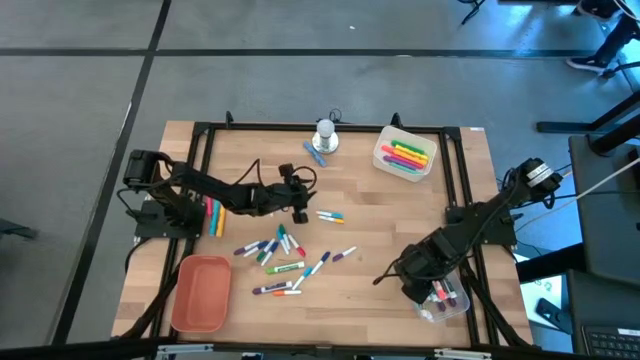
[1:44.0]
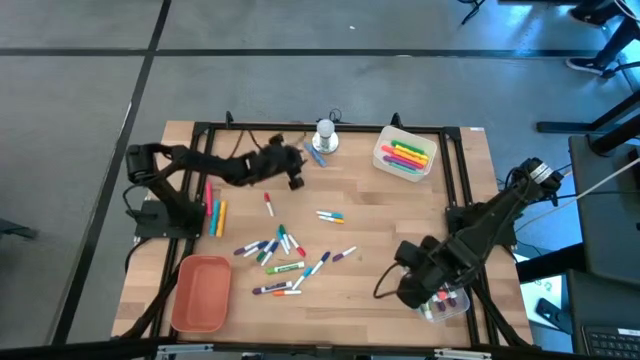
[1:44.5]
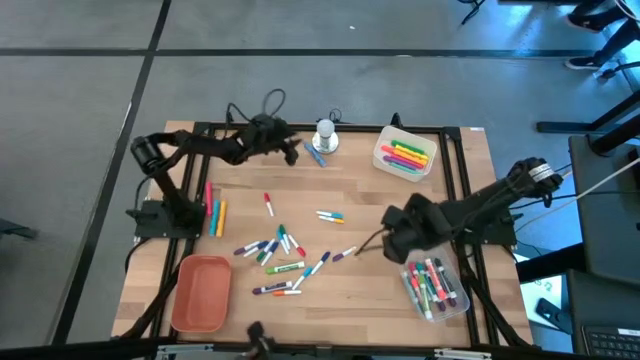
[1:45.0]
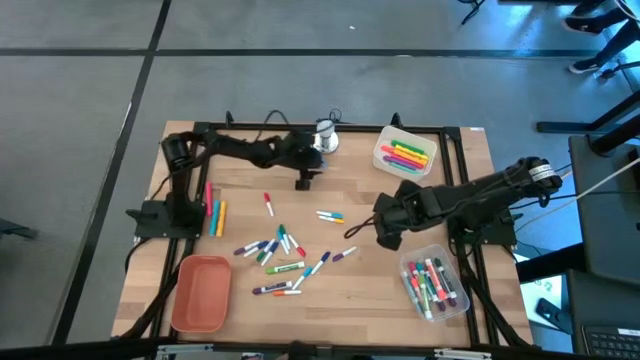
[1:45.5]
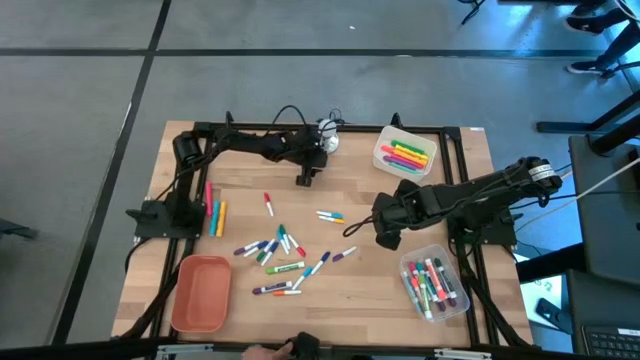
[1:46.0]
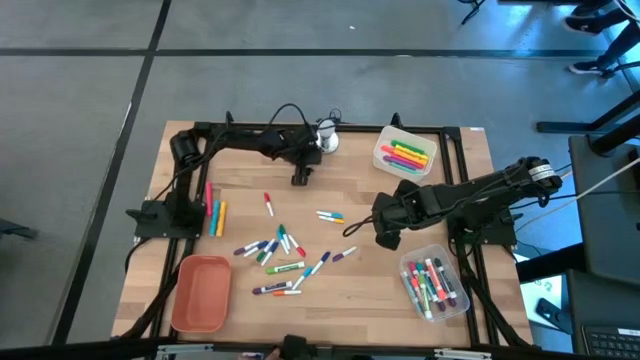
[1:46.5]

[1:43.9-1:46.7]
Task: Pick & Place Markers
Put the large blue highlighter pen into the white bin

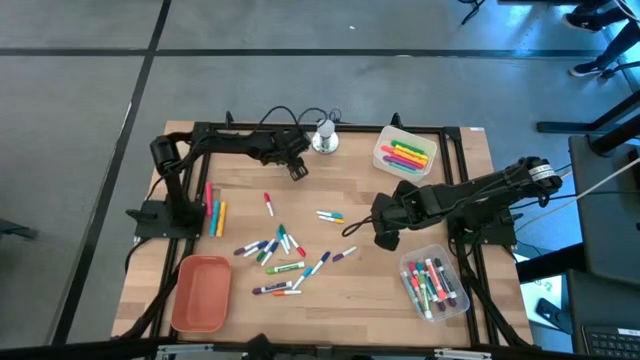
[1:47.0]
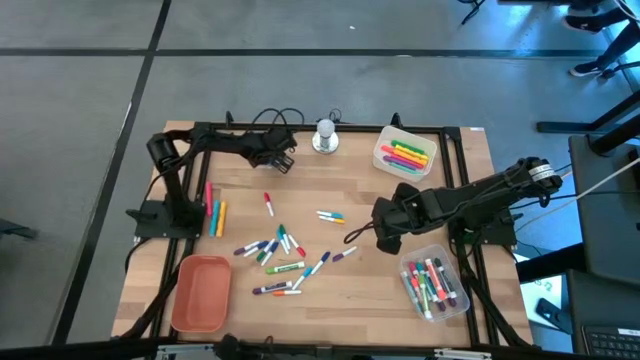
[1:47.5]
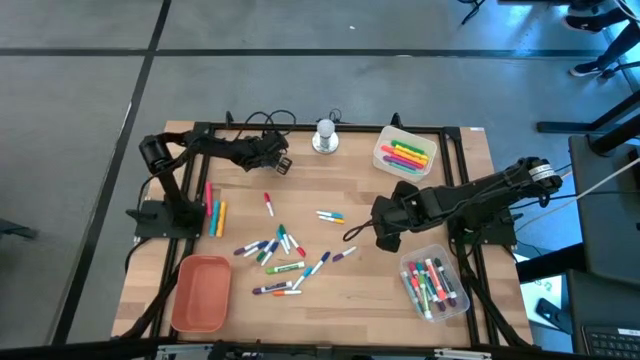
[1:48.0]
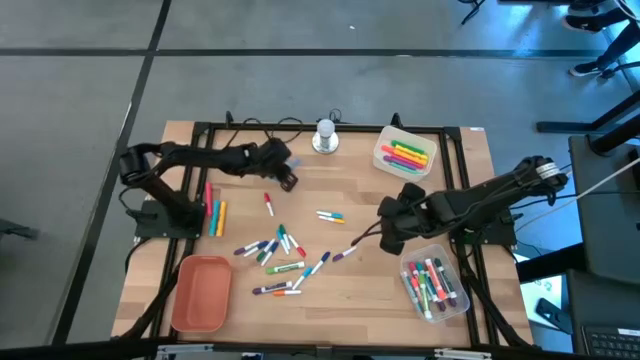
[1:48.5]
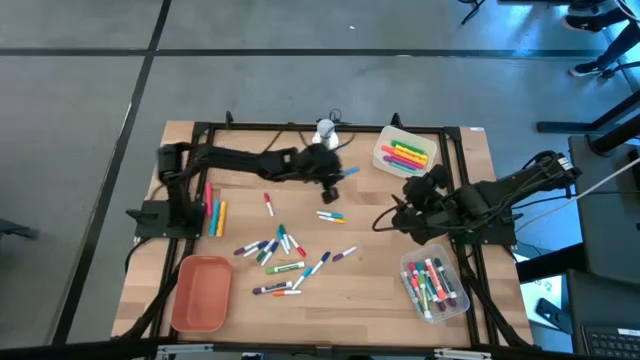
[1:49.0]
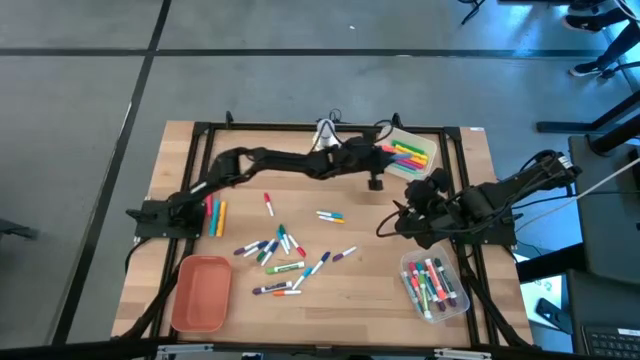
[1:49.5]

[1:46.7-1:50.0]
Put the large blue highlighter pen into the white bin

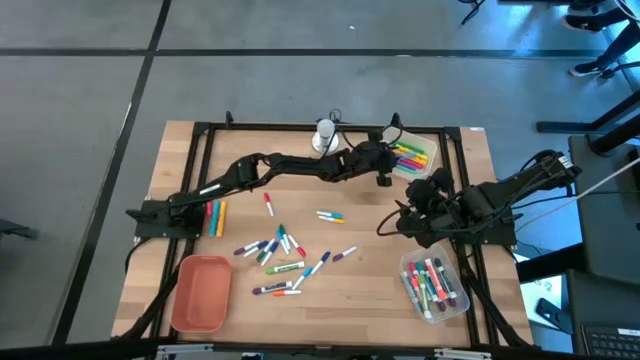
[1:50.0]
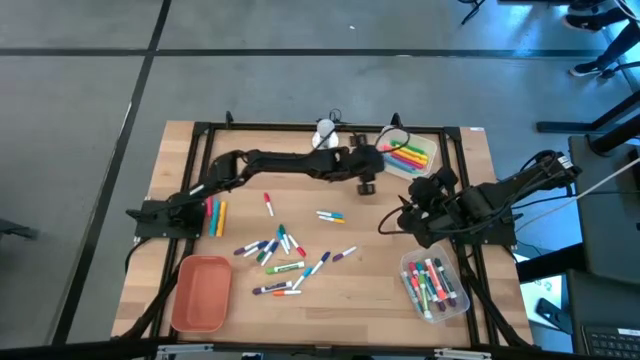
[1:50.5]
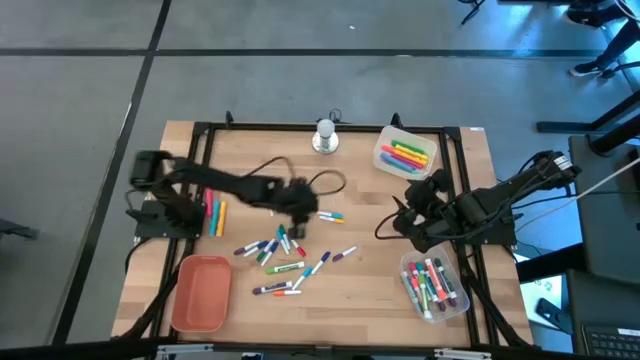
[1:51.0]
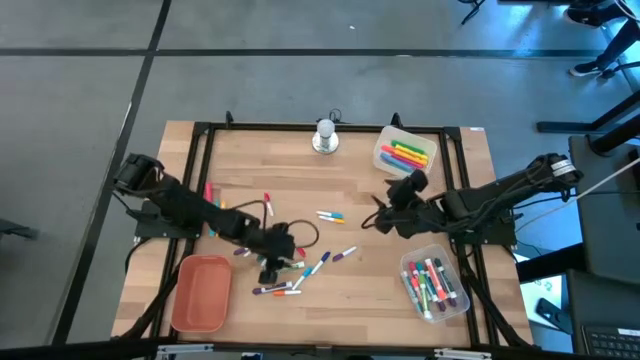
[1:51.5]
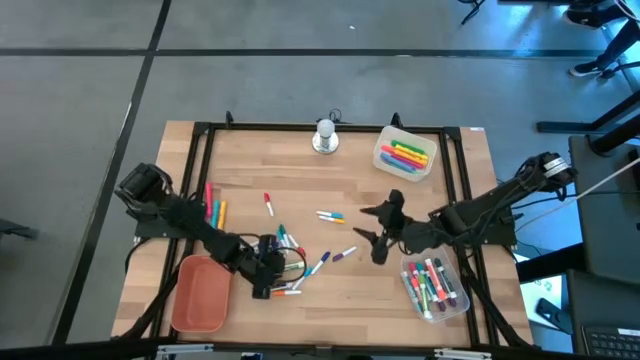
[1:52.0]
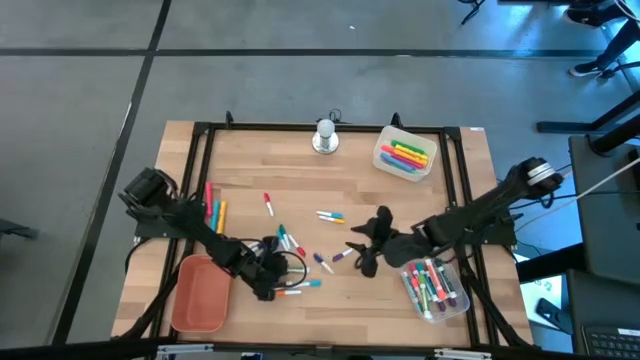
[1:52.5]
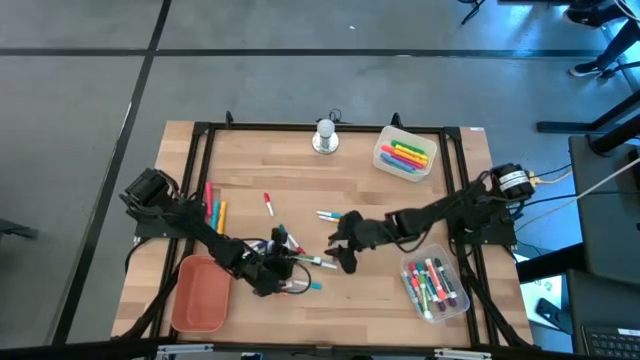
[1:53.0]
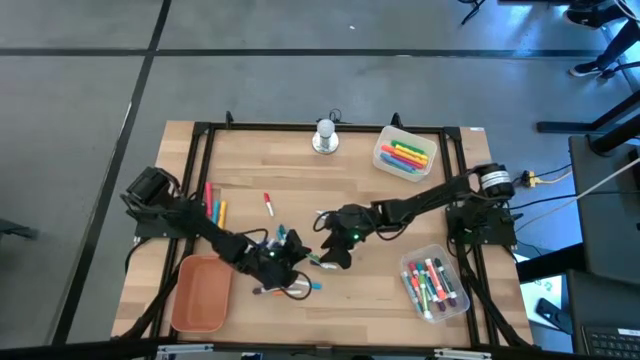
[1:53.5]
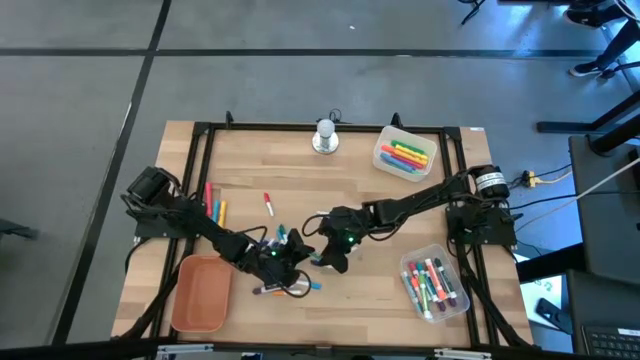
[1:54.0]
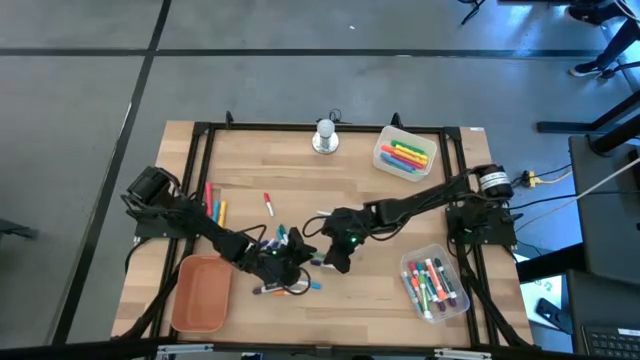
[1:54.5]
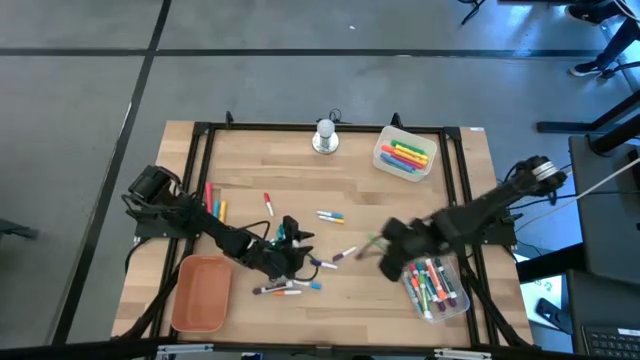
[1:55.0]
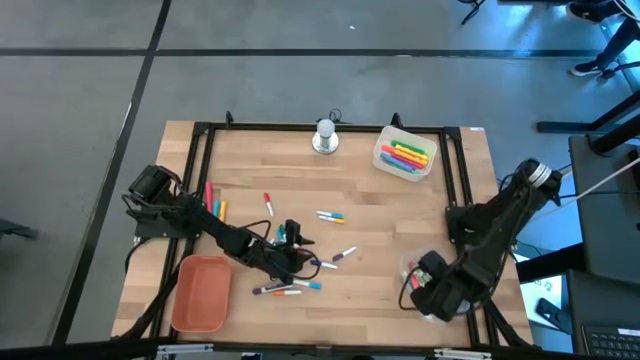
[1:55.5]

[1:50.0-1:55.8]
Put the medium light green marker pen into the transparent bin

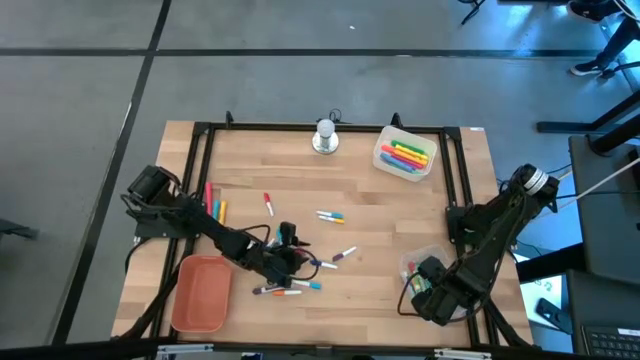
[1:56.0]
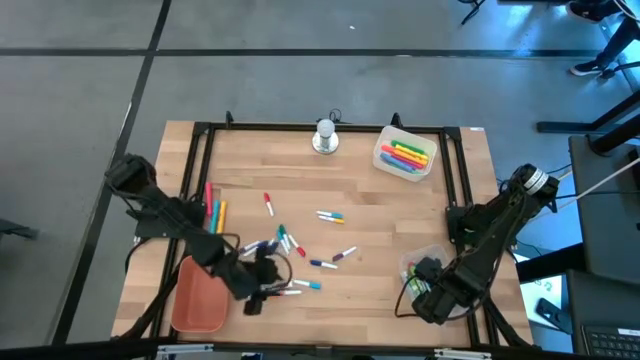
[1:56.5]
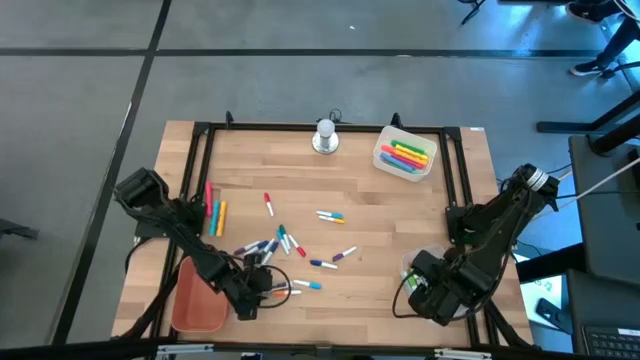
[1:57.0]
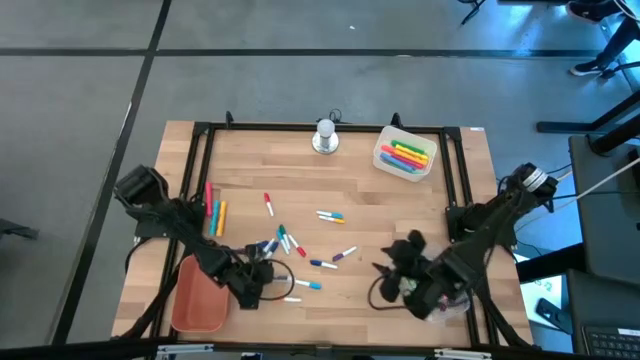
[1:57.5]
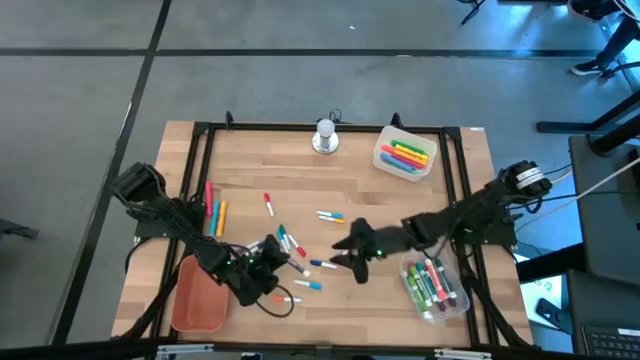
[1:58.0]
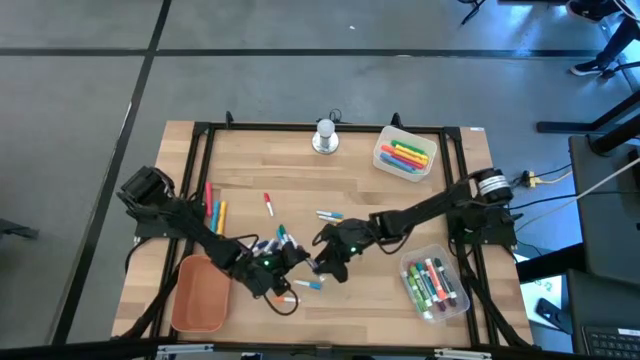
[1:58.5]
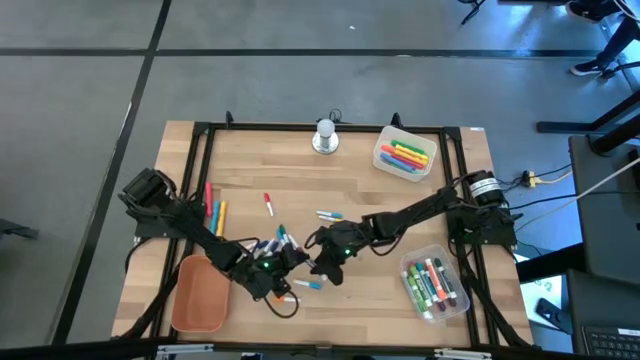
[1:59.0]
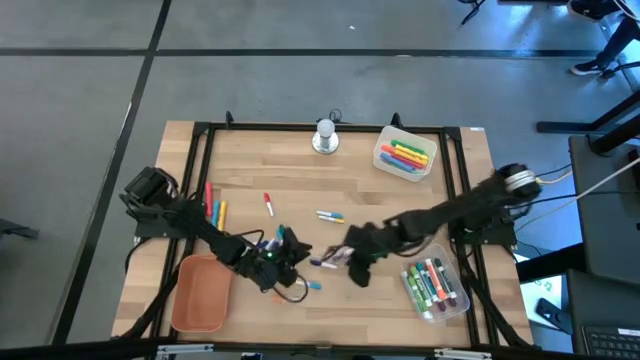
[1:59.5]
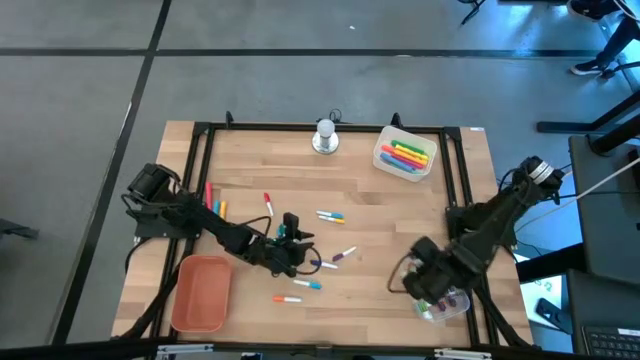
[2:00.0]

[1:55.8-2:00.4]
Put the medium violet marker pen into the transparent bin

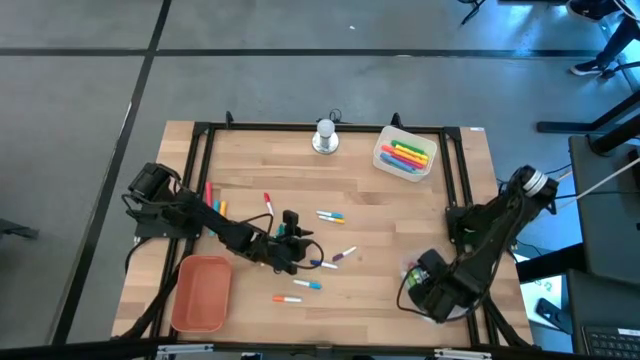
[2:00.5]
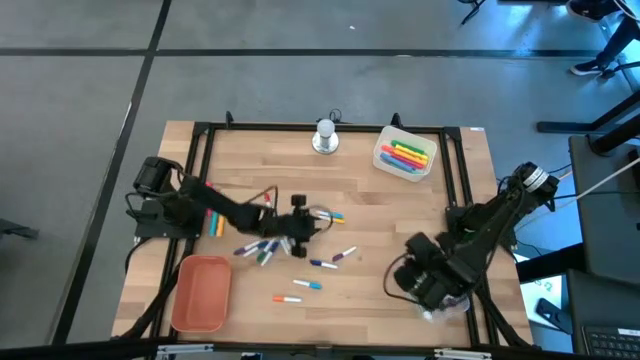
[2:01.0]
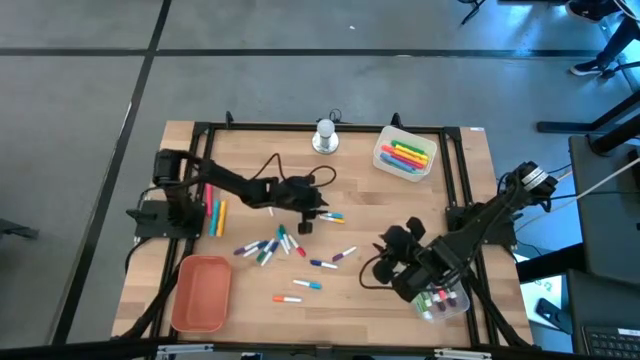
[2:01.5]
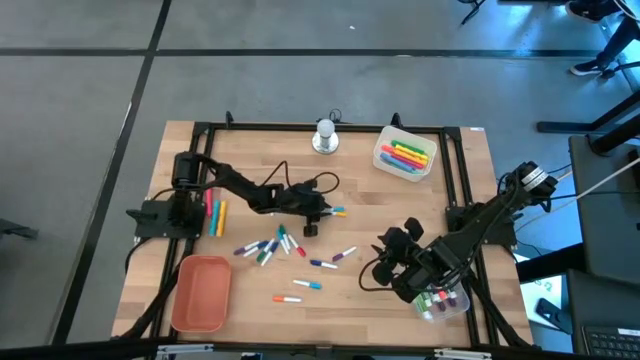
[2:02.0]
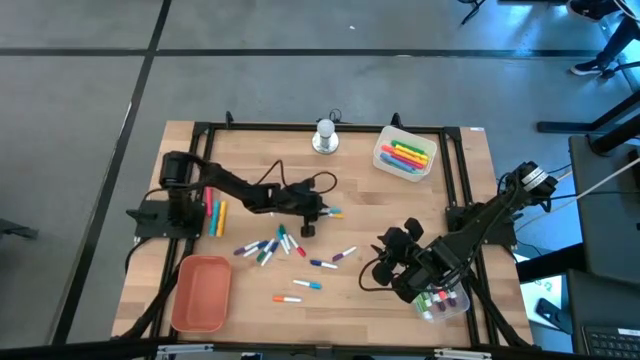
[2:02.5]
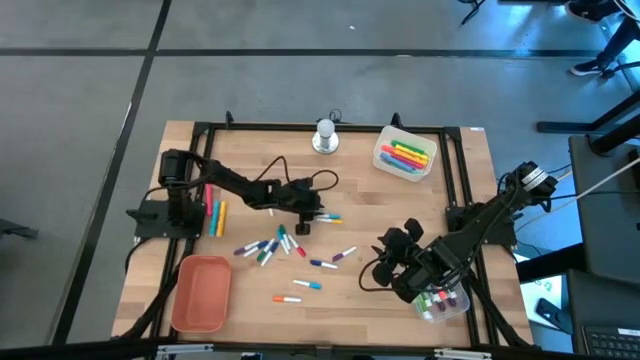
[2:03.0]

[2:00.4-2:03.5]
Put the small light blue highlighter pen into the orange bin

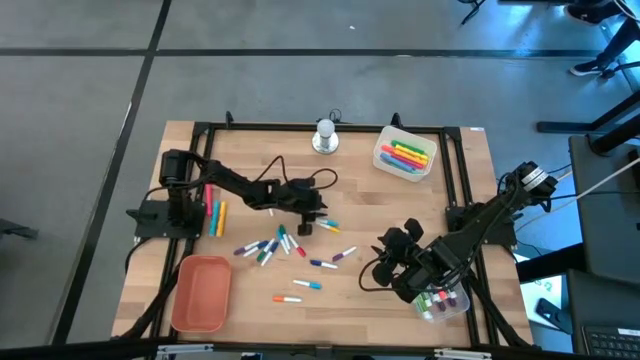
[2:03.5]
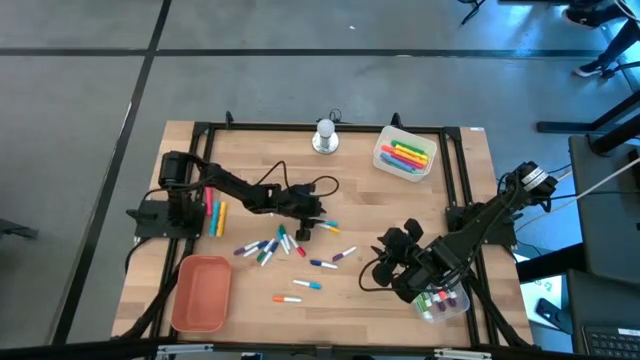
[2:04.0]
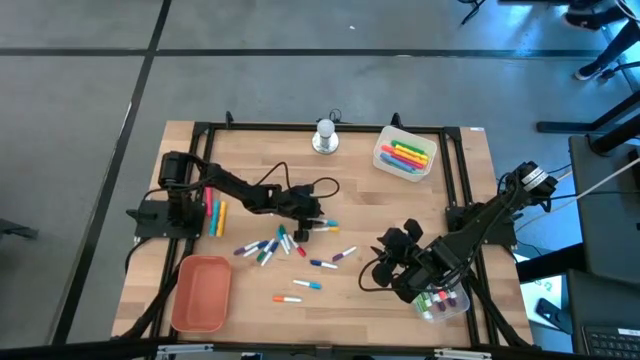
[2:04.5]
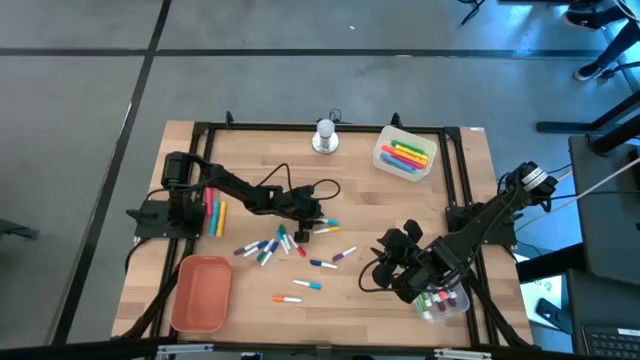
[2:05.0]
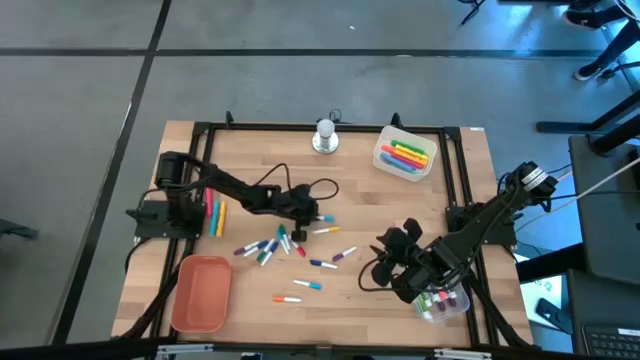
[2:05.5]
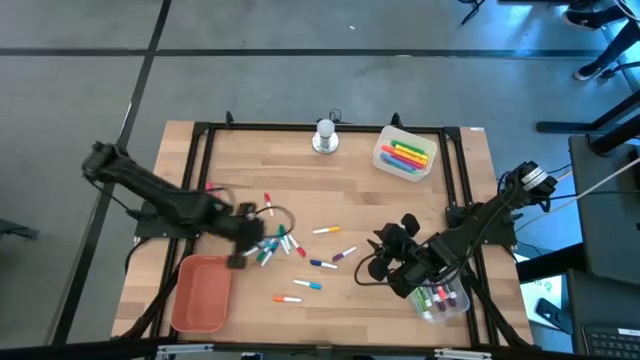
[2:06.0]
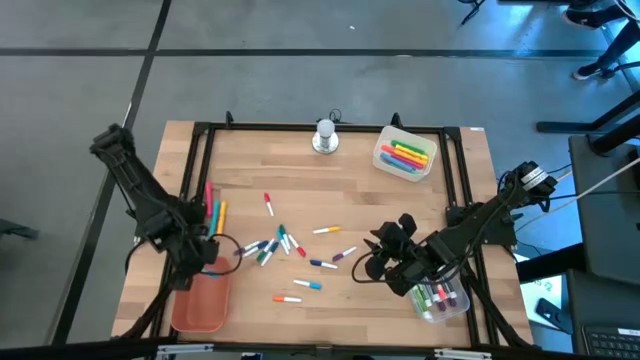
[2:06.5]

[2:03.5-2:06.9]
Put the small light blue highlighter pen into the orange bin
